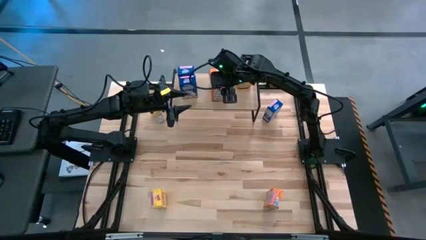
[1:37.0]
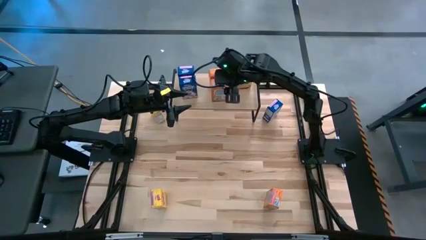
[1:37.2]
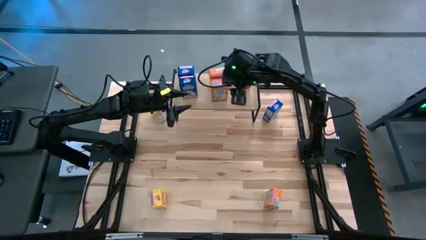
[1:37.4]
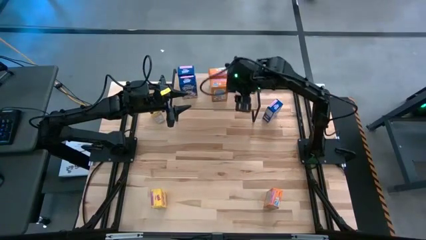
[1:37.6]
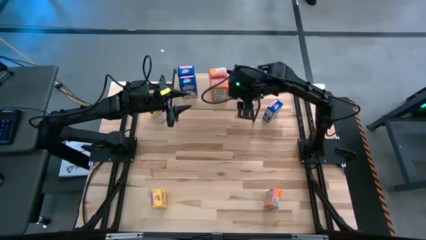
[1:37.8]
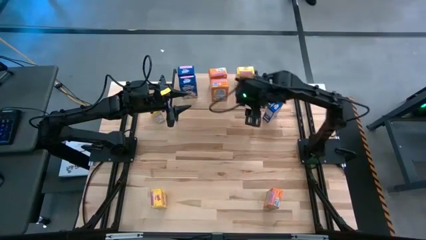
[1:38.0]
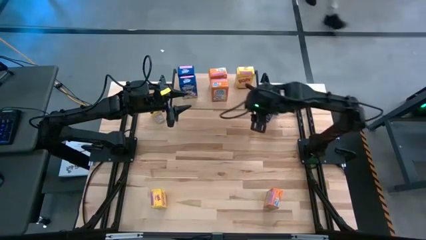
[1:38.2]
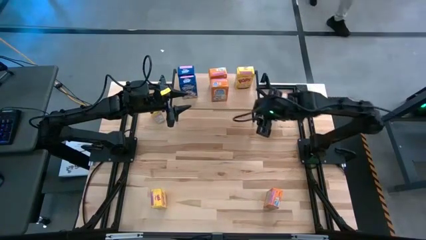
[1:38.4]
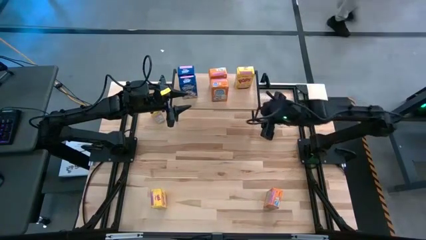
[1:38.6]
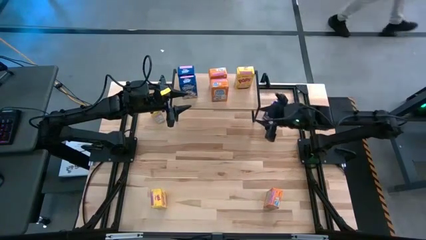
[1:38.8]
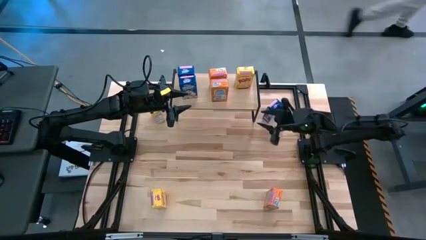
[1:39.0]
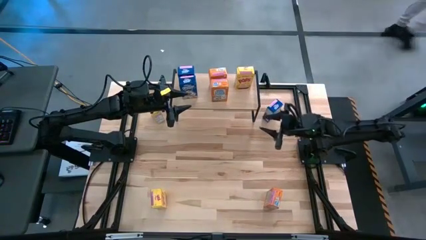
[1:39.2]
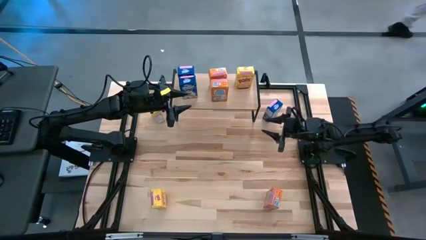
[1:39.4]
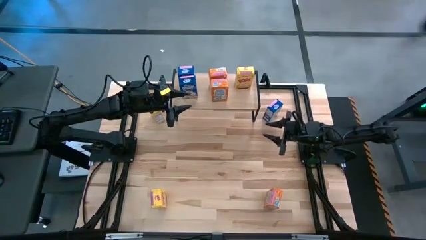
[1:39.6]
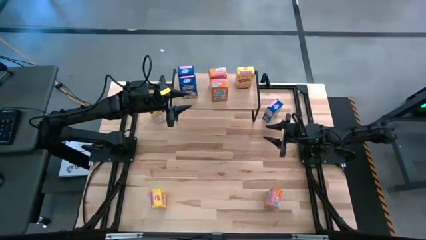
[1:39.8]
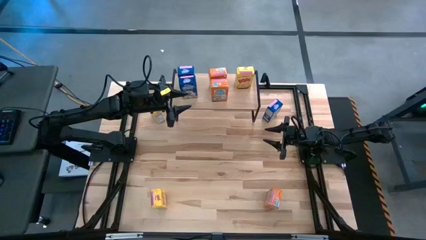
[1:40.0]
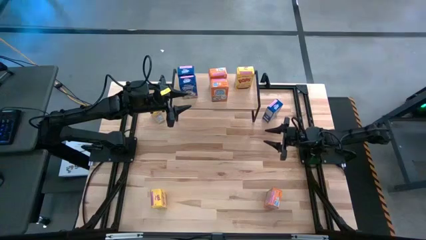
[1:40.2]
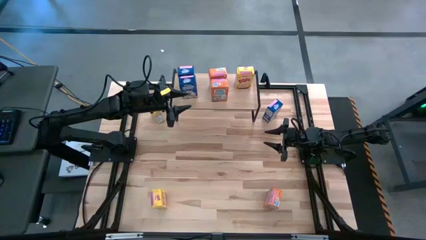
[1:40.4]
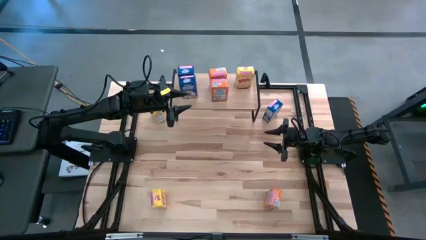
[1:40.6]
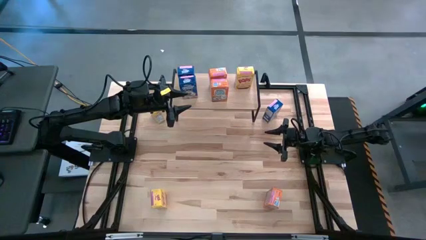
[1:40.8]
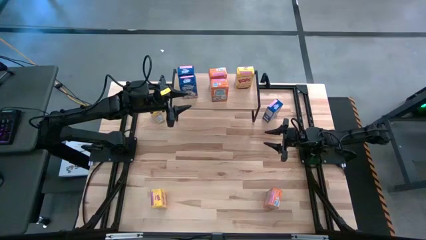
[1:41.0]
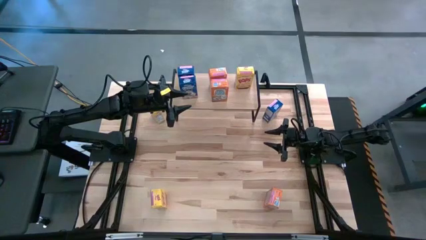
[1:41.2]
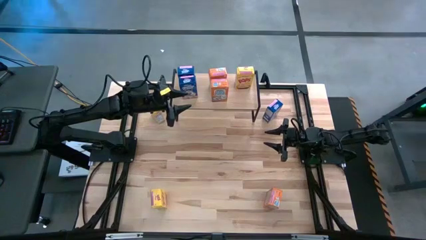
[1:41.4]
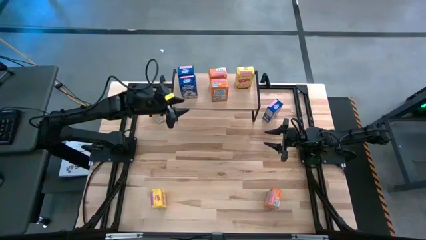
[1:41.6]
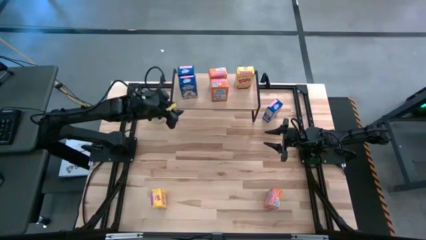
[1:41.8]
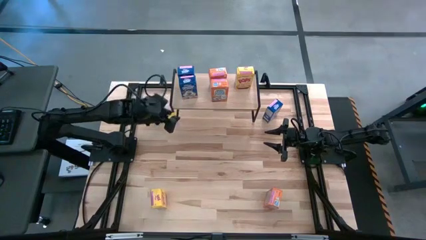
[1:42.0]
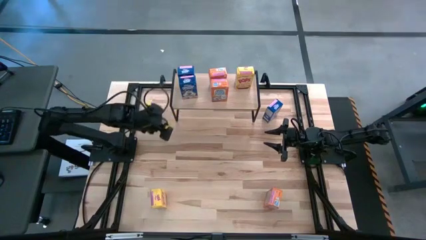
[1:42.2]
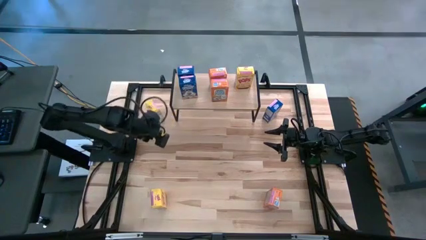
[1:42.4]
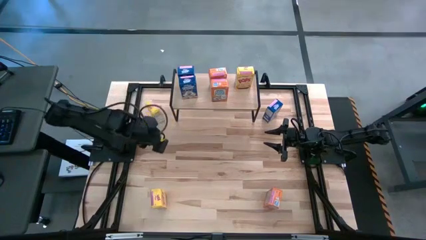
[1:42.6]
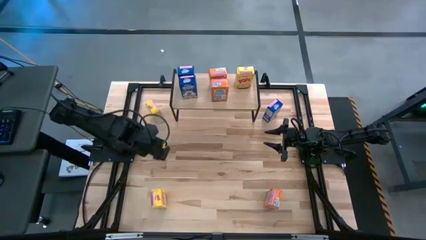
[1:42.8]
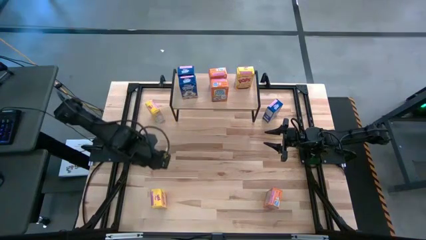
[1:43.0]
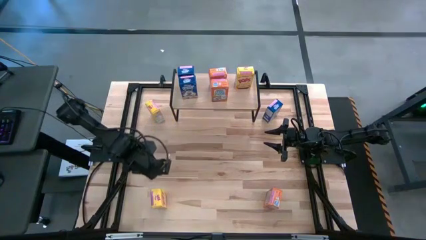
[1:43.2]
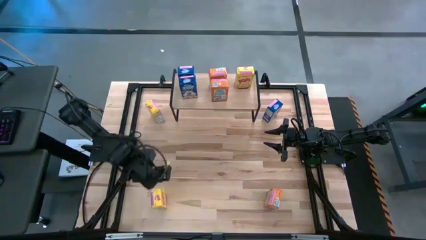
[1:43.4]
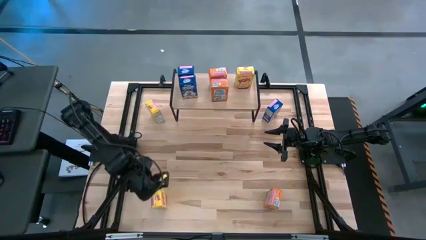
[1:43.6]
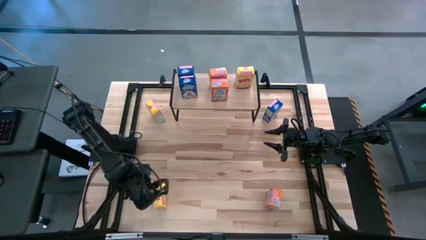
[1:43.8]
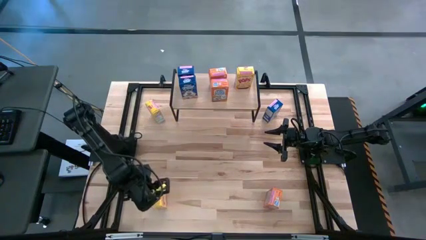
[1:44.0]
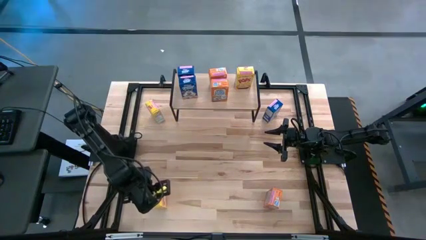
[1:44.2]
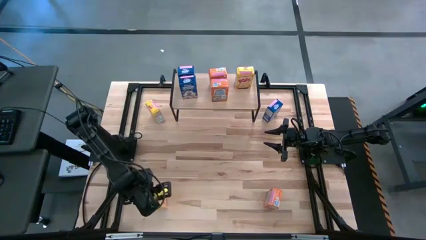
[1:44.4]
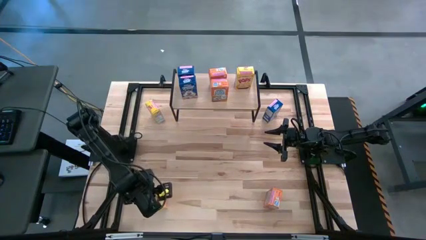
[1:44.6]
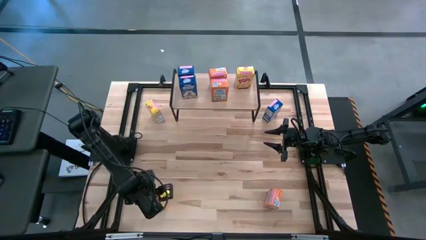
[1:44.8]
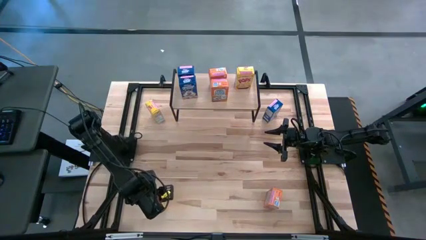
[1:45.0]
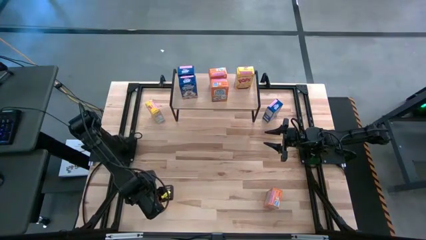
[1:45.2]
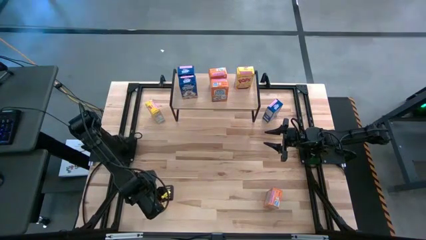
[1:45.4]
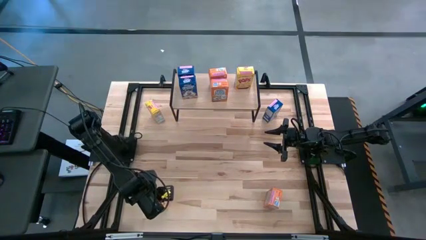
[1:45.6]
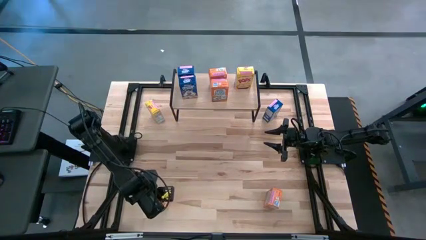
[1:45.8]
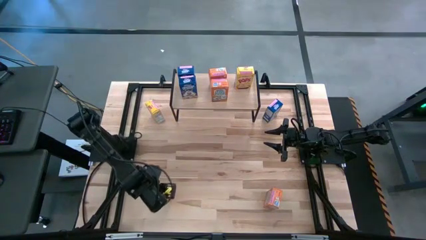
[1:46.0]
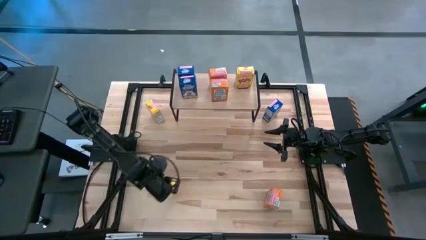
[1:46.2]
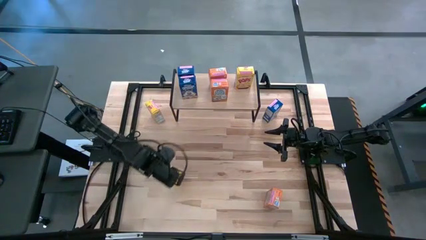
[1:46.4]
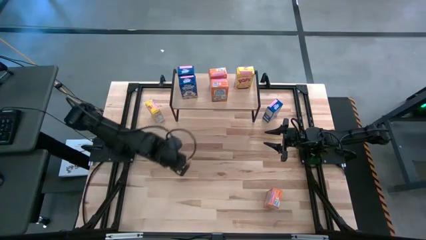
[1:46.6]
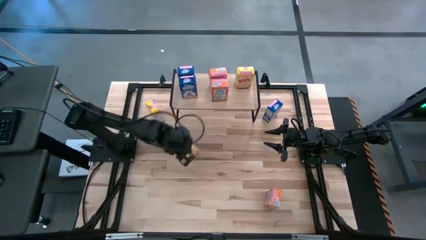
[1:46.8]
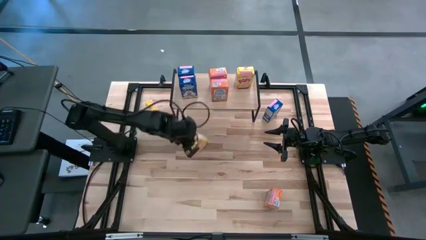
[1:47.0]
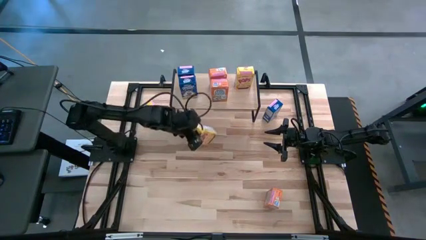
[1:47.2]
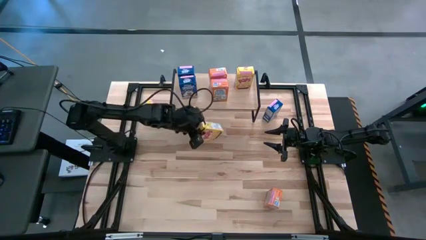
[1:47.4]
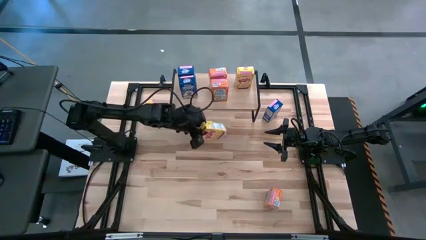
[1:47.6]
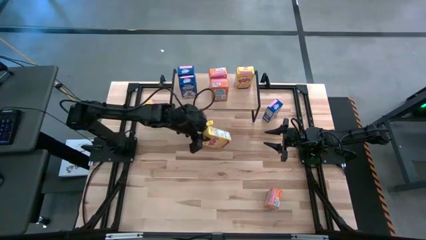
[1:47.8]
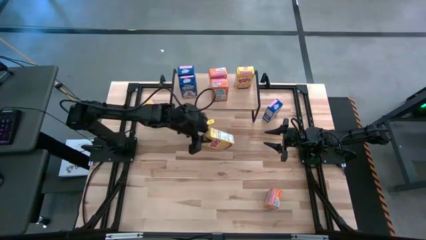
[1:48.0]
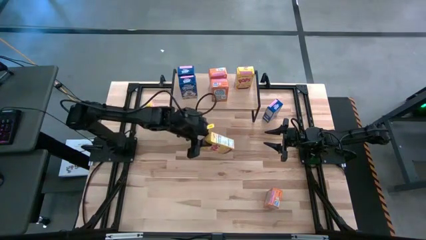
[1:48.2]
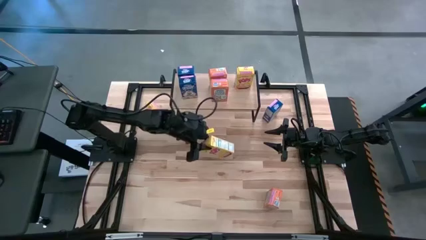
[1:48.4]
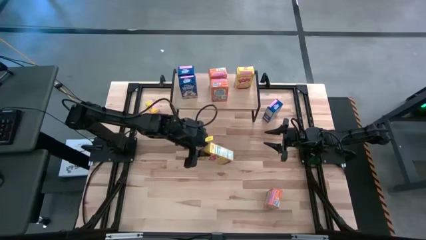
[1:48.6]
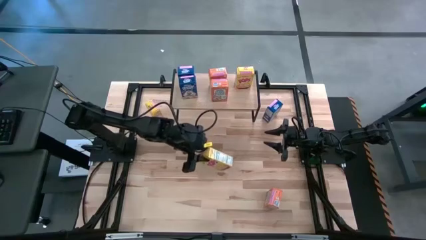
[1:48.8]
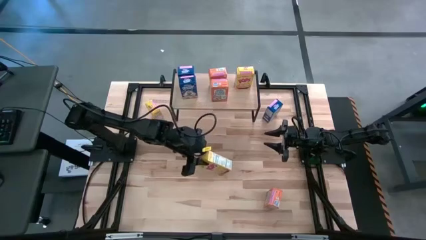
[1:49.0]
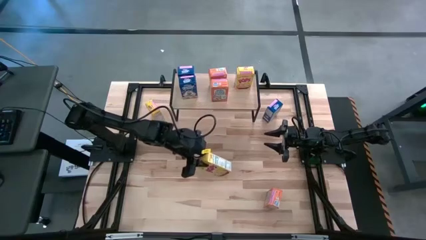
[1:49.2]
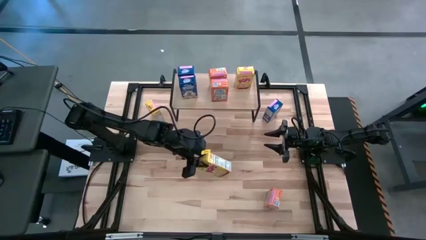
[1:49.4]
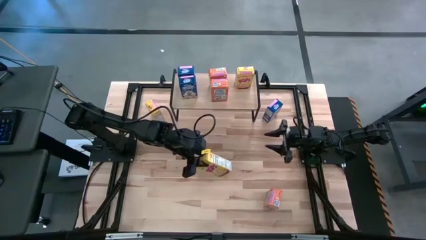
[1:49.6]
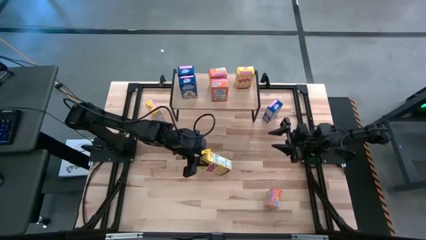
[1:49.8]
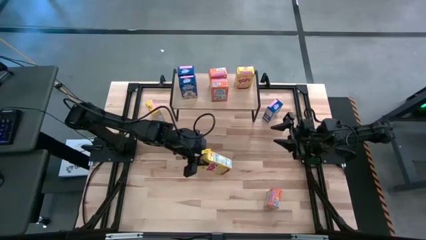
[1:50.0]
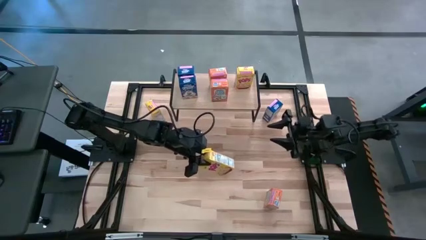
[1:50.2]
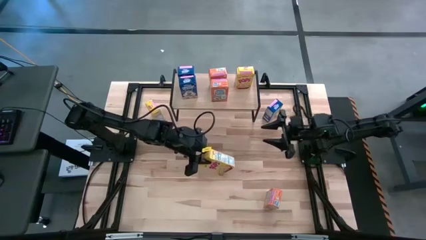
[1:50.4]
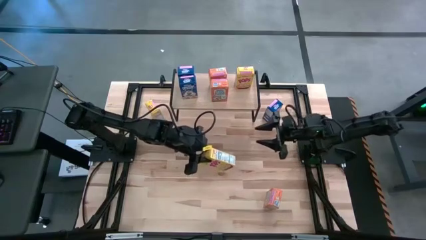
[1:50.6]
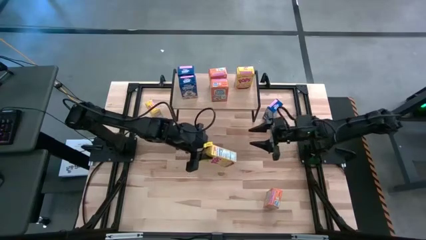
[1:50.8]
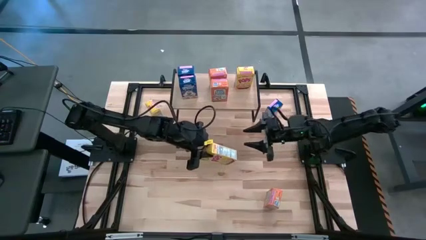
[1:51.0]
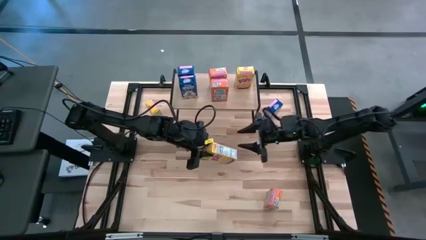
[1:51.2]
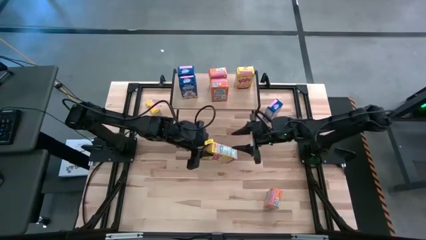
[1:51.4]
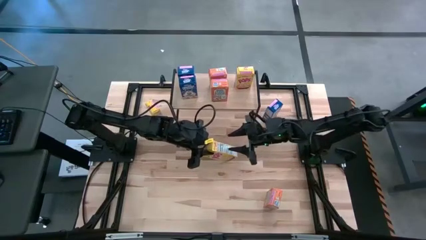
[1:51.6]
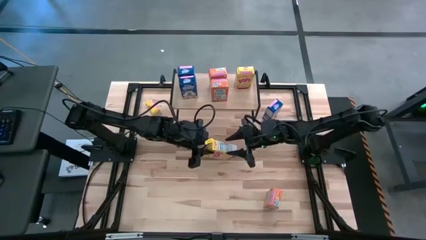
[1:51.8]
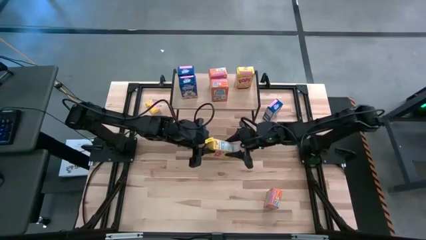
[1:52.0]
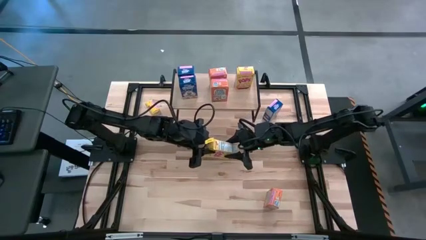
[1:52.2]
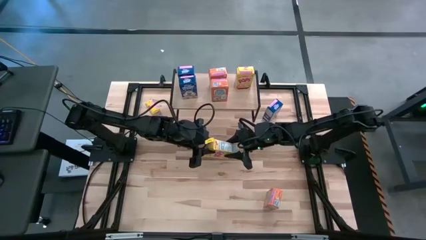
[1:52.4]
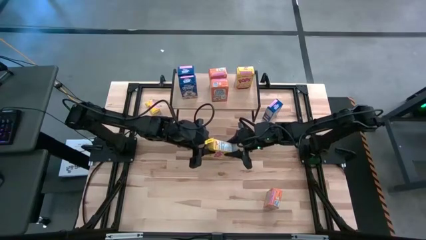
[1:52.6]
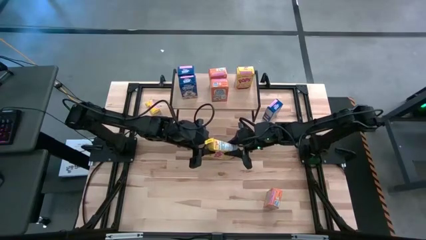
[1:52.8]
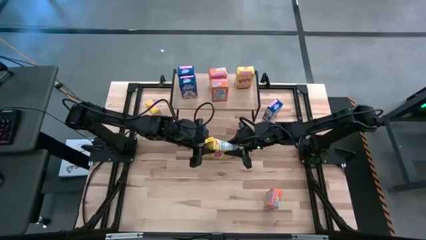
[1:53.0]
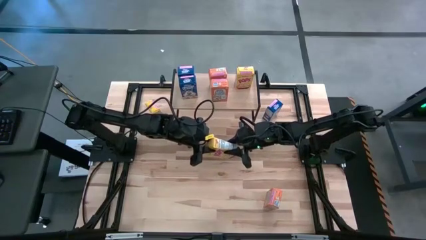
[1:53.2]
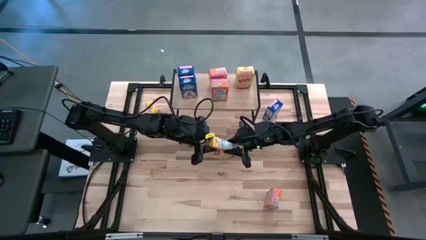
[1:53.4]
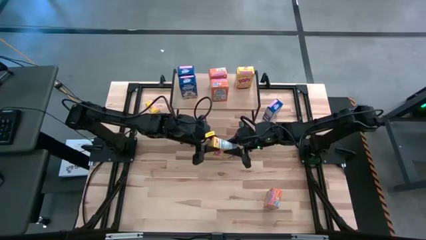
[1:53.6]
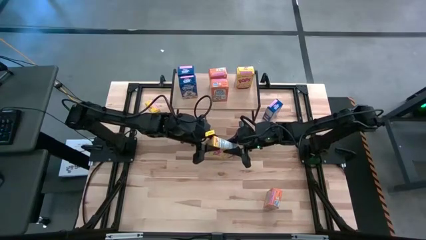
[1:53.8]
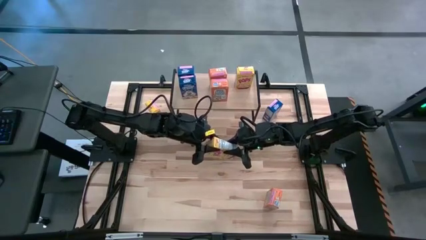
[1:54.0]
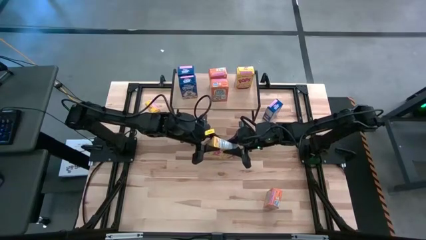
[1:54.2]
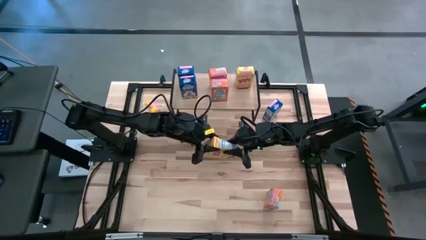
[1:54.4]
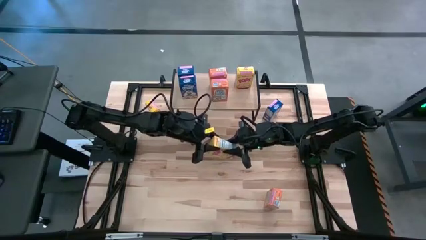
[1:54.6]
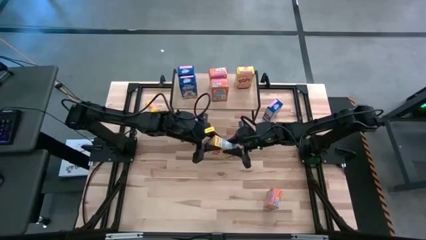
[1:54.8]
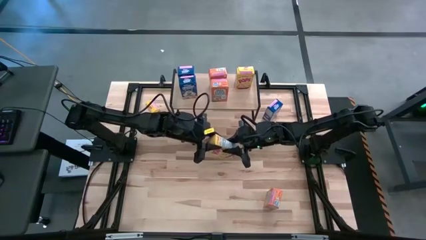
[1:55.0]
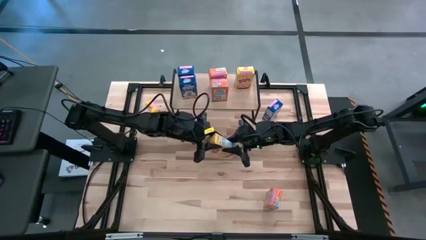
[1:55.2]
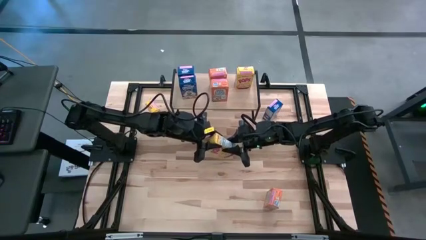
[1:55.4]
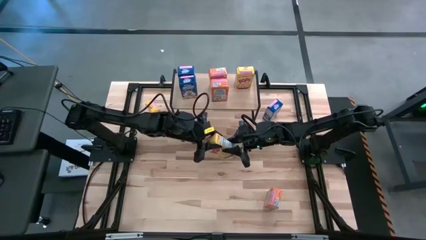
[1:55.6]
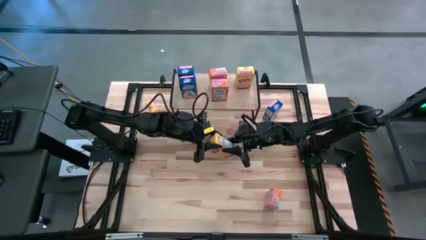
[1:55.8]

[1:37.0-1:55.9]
Task: Stack cereal on shelf
Put the bottom yellow cereal box aligned with the other yellow cereal box on the shelf
